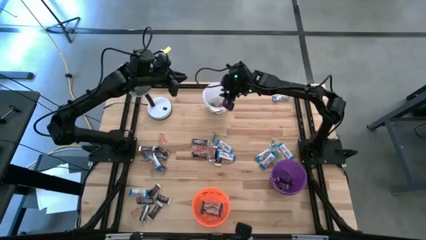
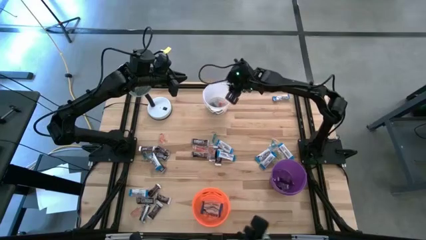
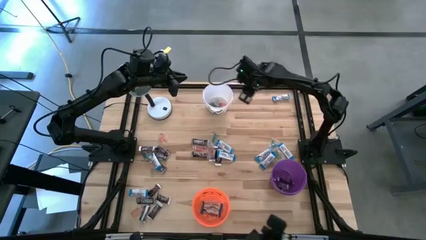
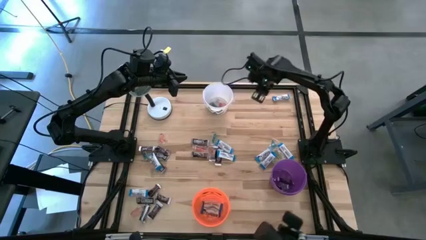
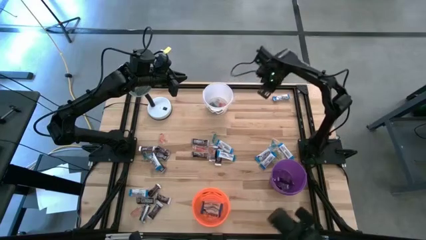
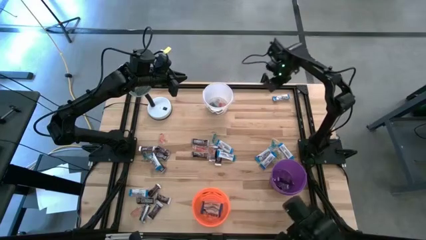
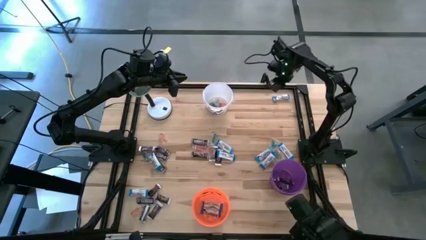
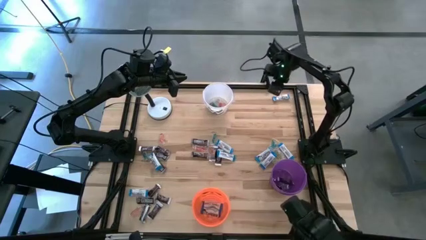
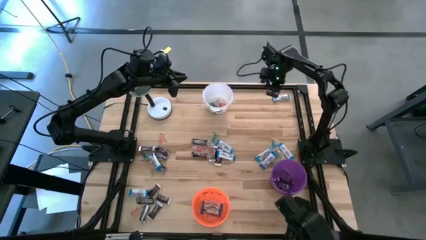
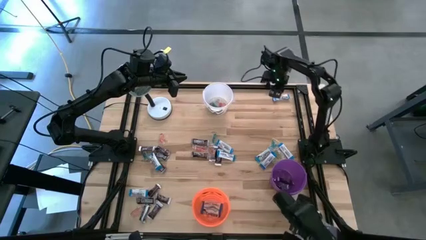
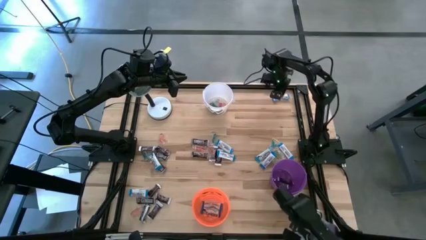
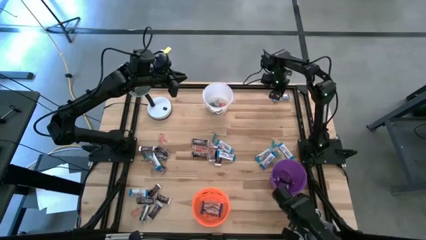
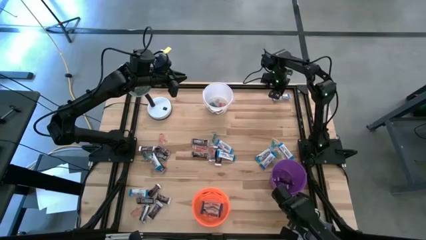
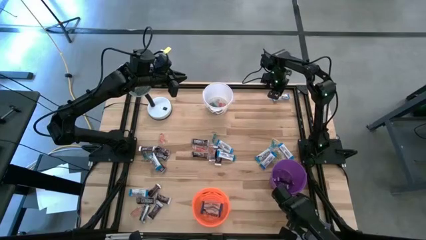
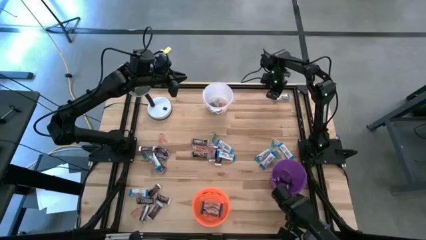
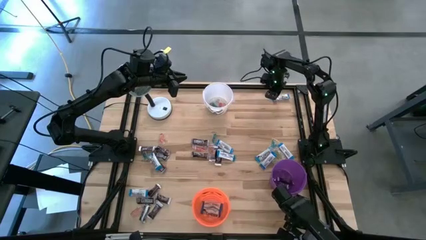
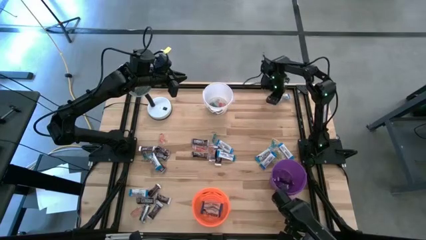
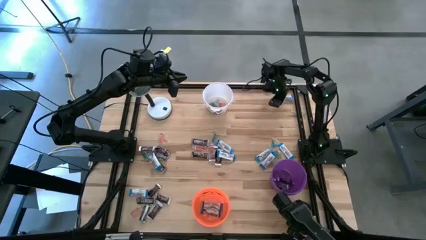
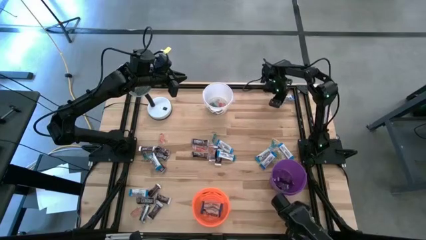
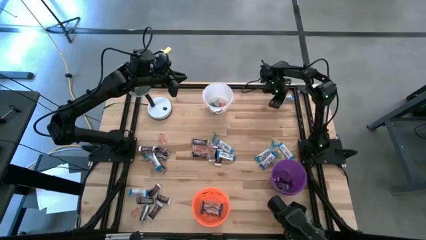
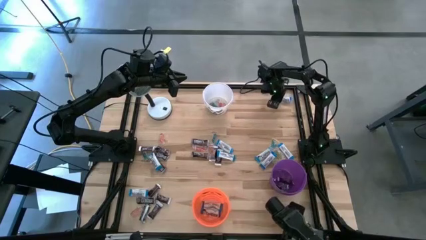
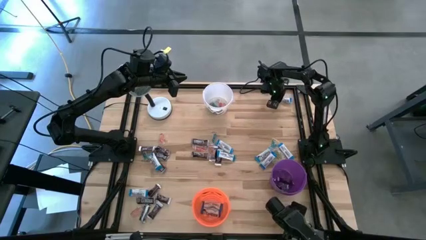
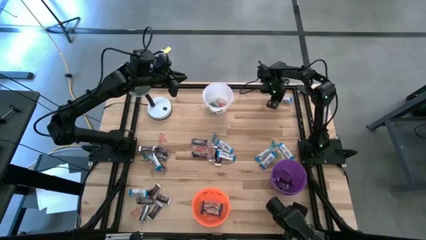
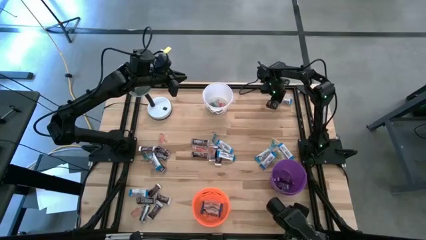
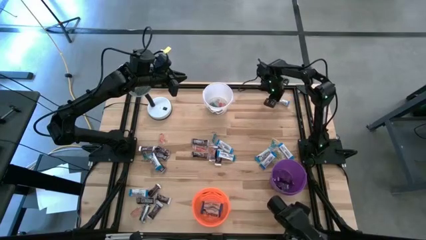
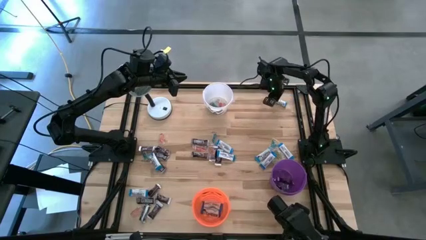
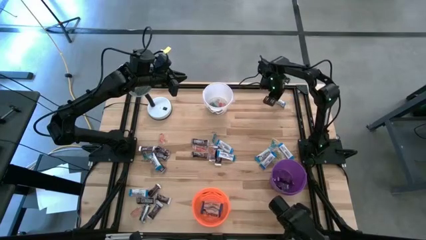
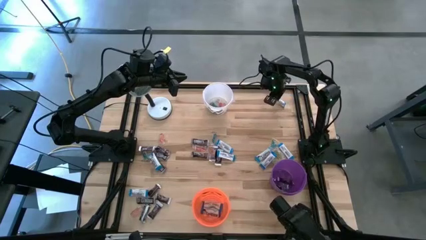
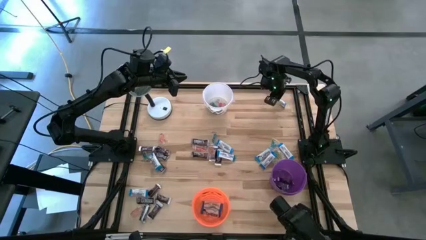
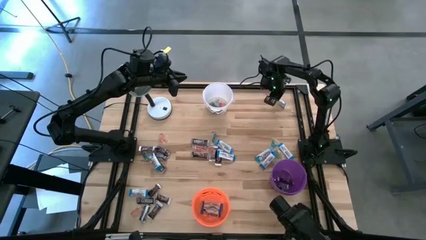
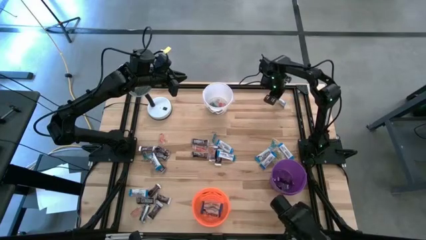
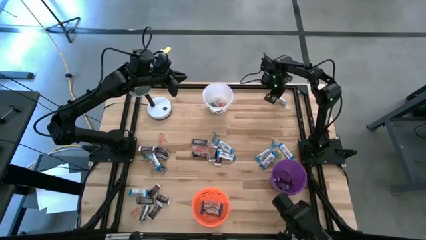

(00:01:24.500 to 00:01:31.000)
Task: Organize candy in baskets
Put the white chocolate bar into the orange bucket

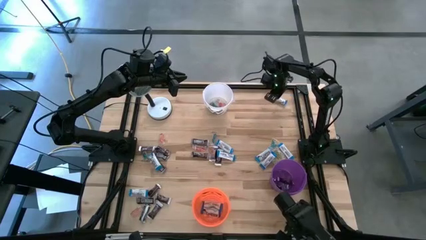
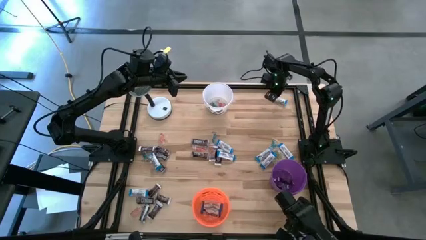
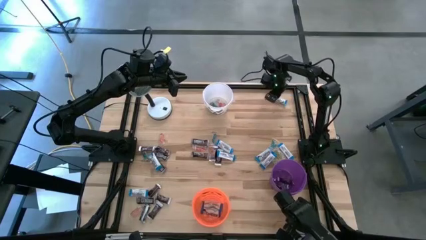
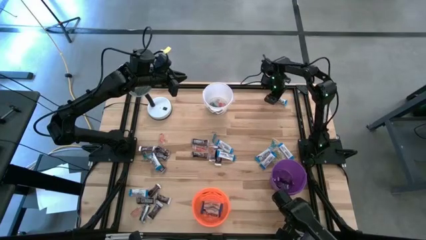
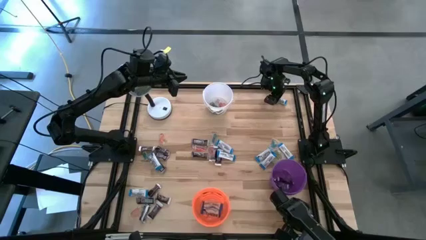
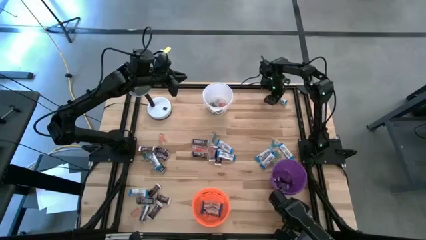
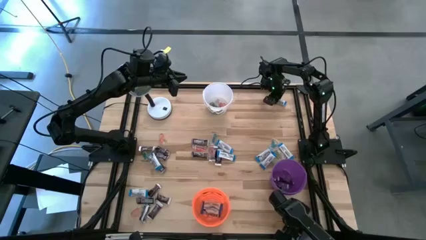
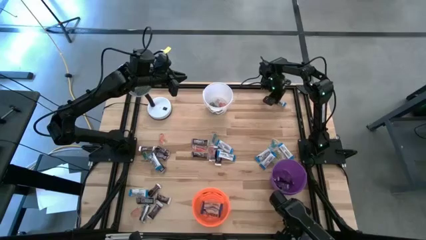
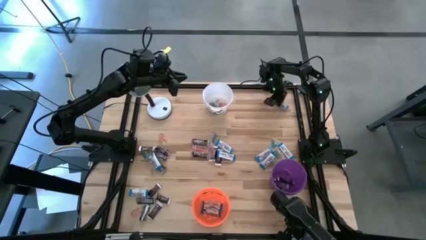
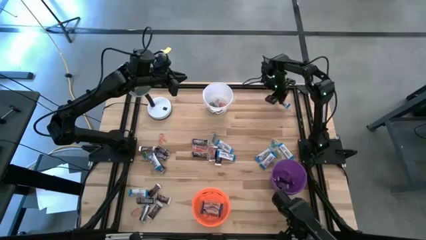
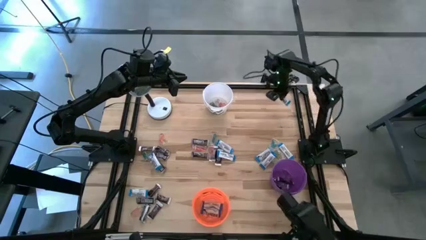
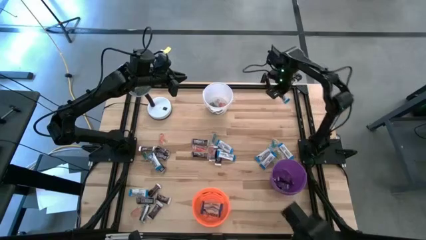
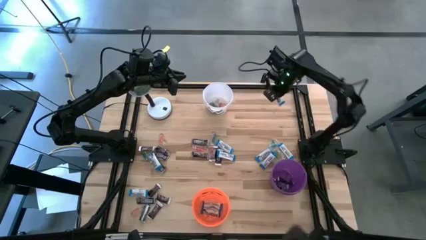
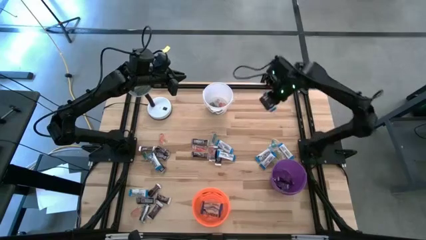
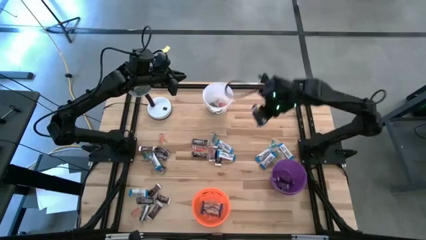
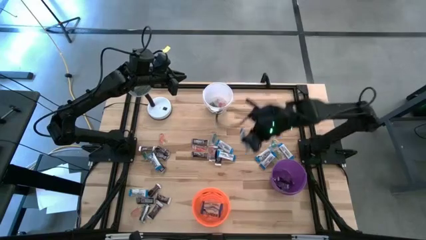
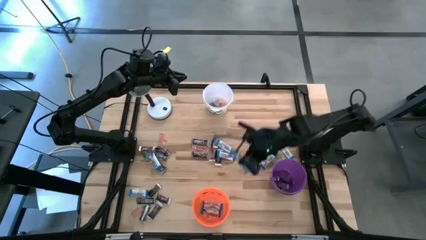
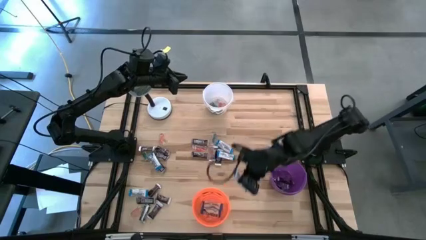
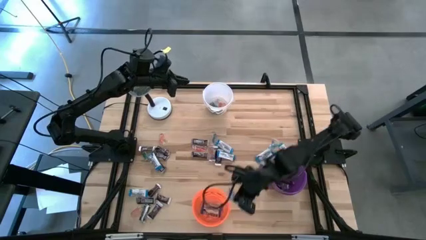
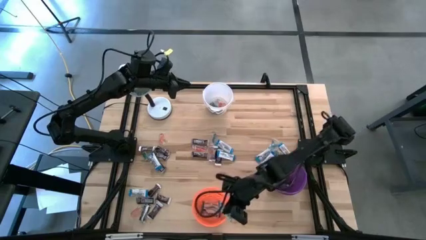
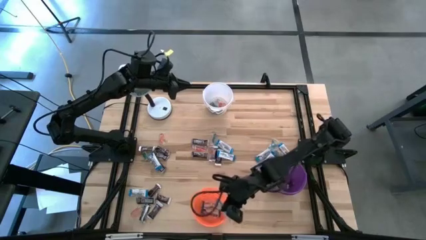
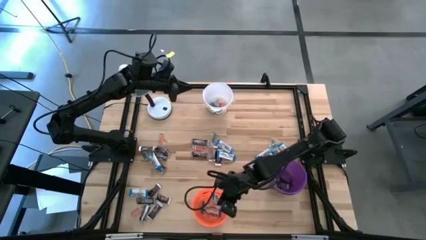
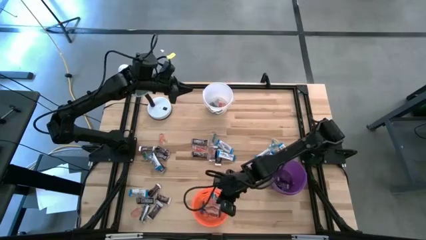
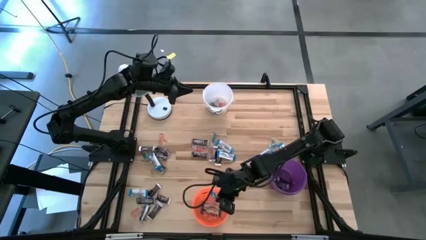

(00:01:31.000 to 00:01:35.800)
Put the white chocolate bar into the orange bucket

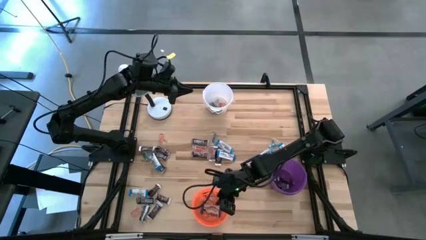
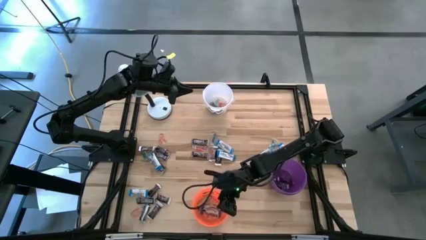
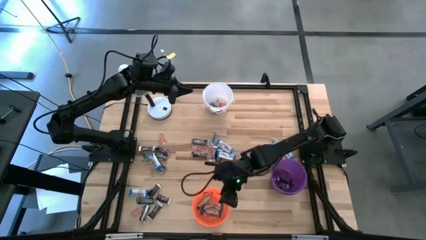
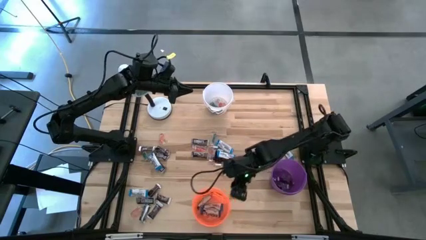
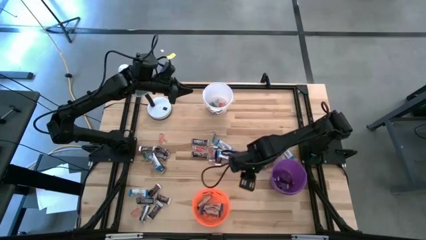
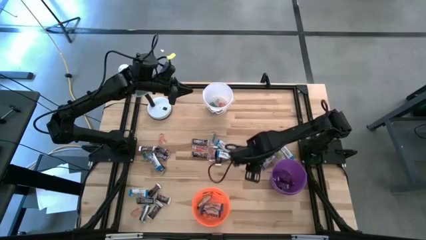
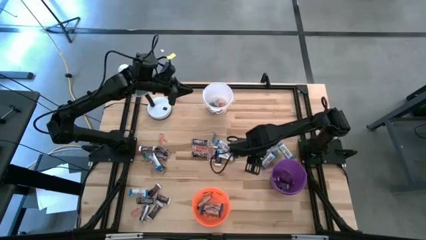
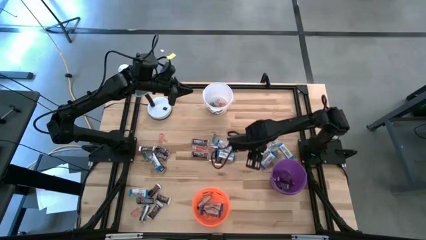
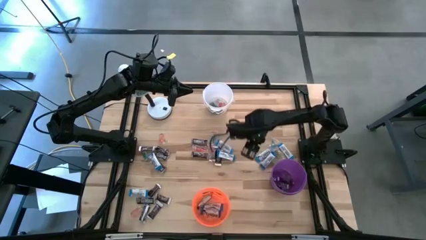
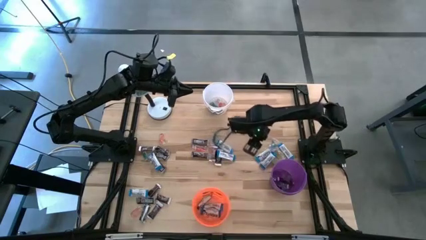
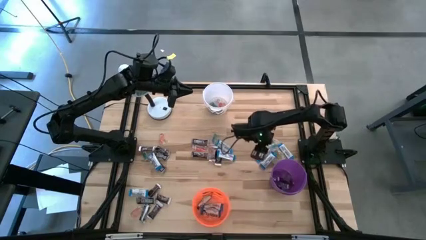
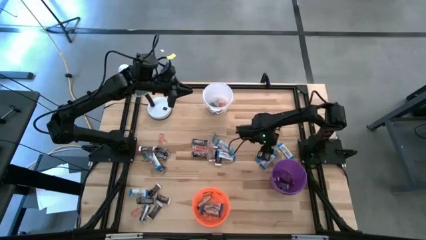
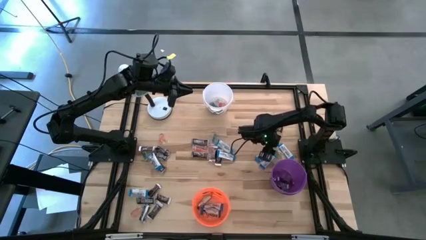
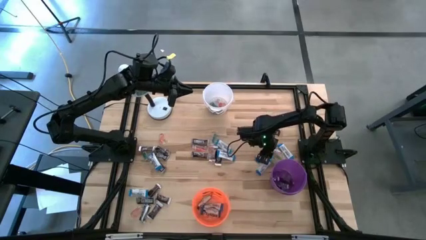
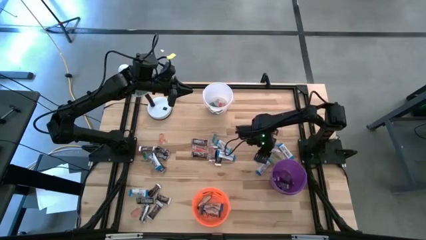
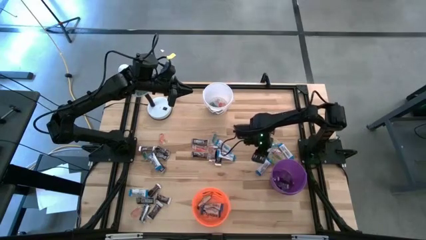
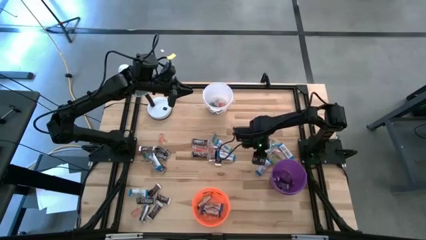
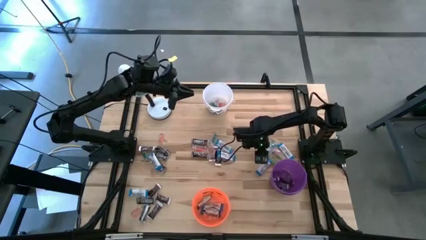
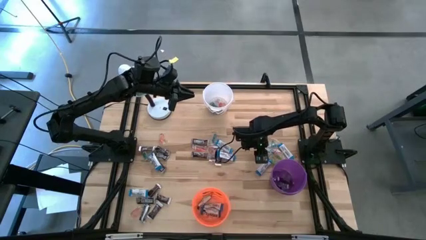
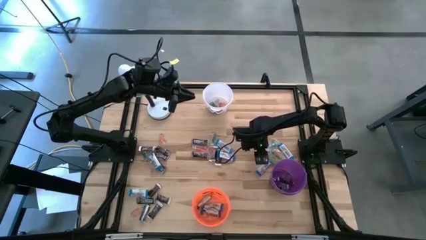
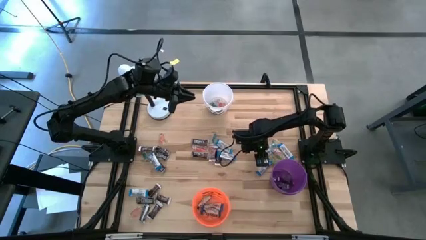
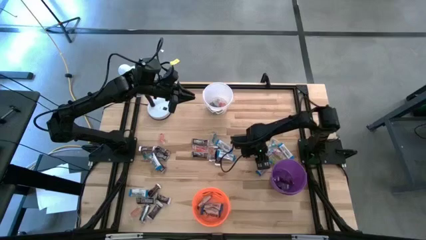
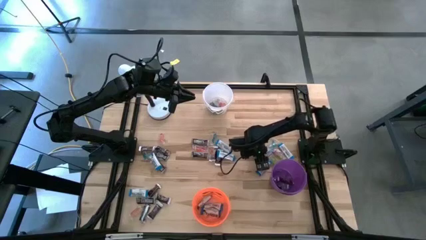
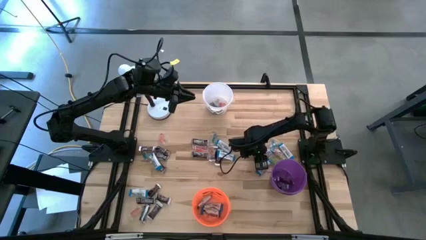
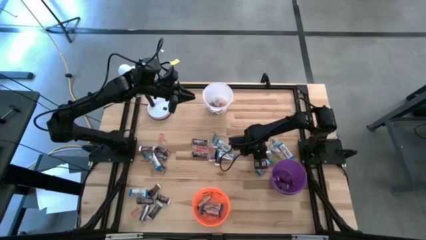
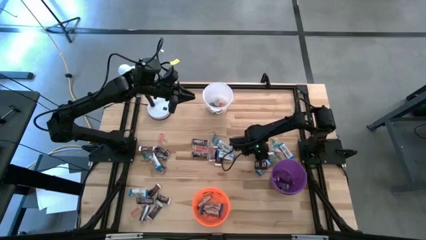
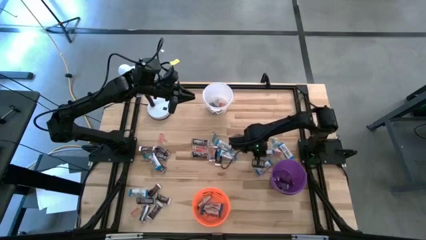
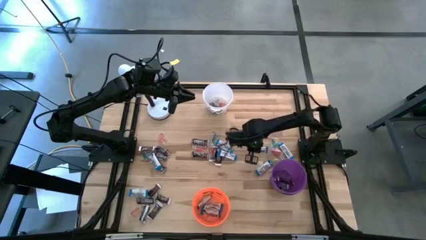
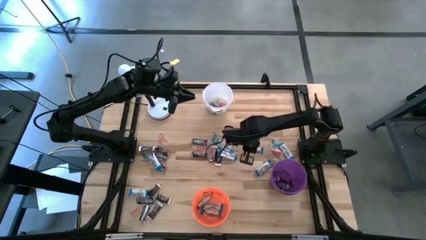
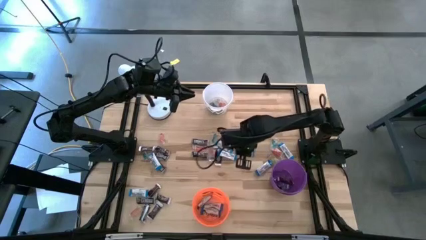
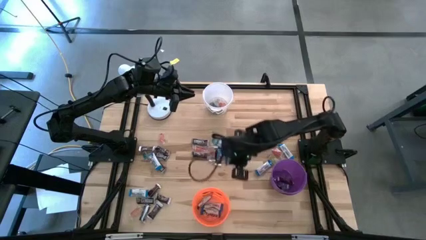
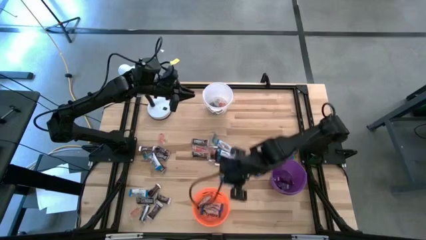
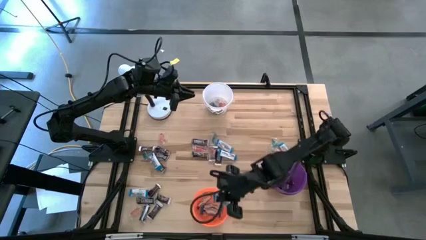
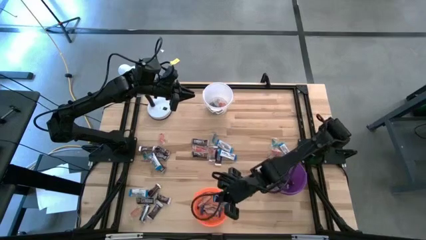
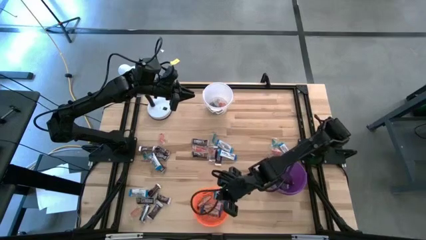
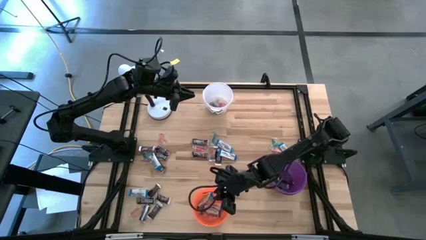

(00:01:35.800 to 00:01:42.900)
Put the white chocolate bar into the orange bucket
